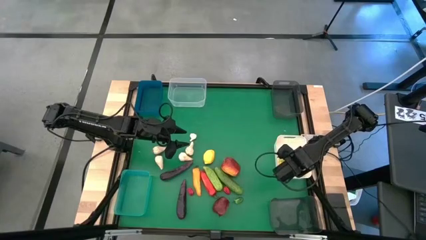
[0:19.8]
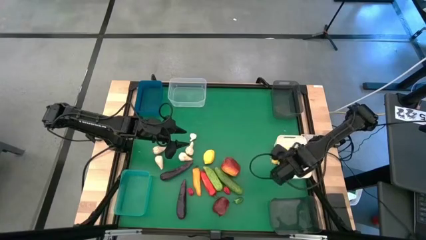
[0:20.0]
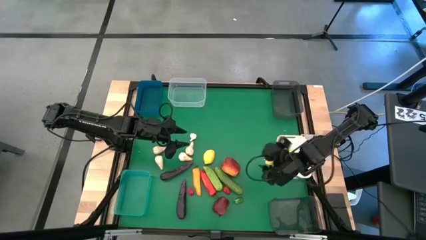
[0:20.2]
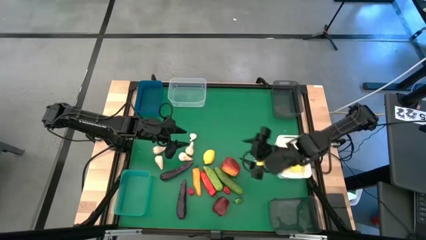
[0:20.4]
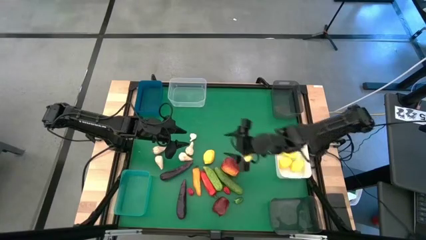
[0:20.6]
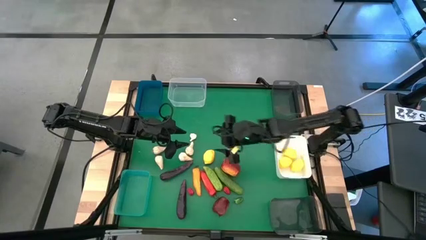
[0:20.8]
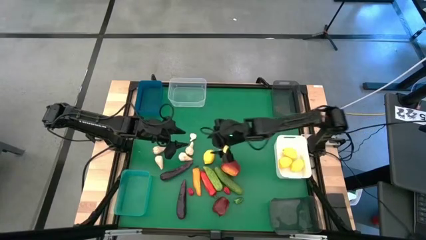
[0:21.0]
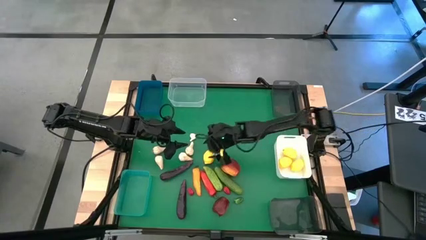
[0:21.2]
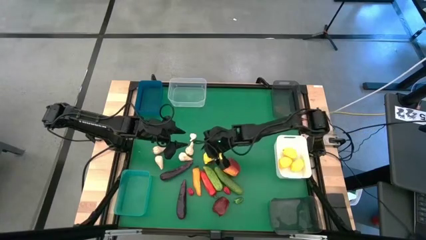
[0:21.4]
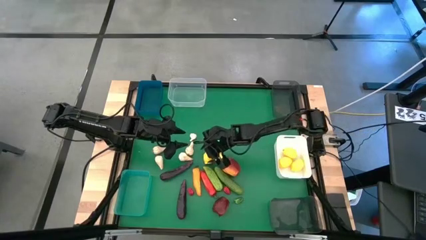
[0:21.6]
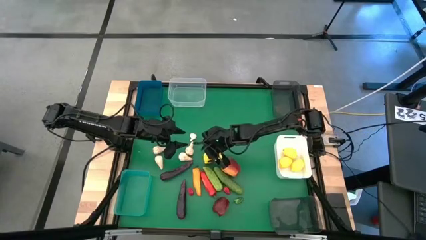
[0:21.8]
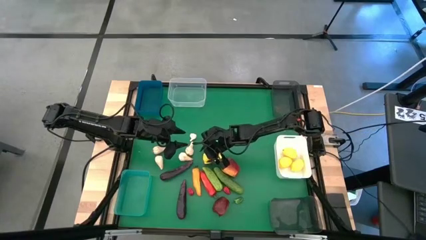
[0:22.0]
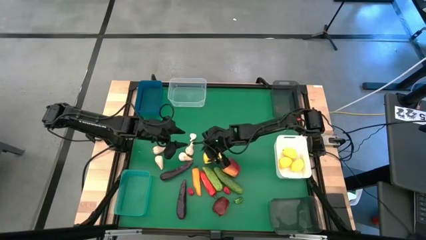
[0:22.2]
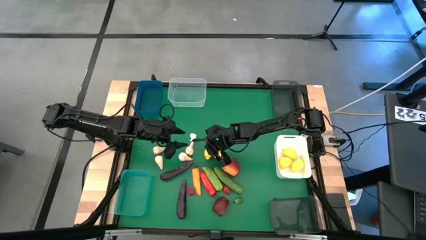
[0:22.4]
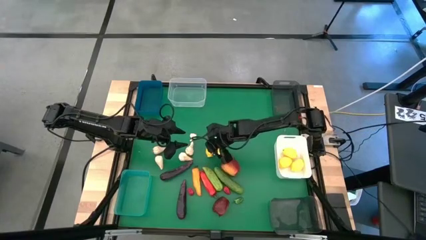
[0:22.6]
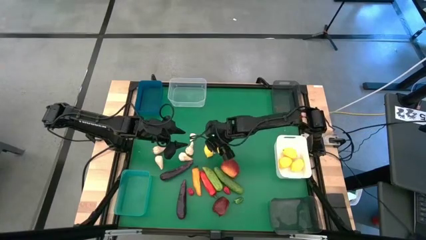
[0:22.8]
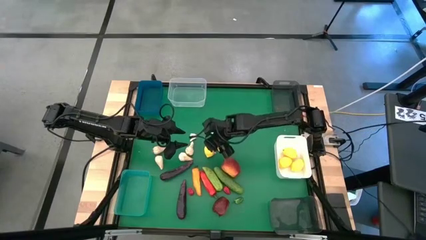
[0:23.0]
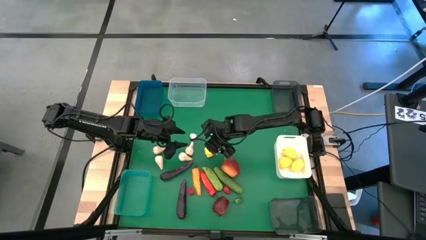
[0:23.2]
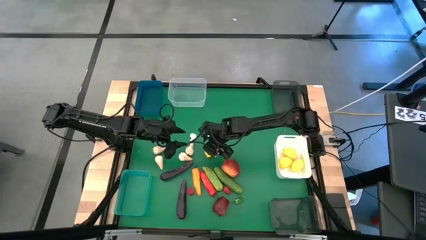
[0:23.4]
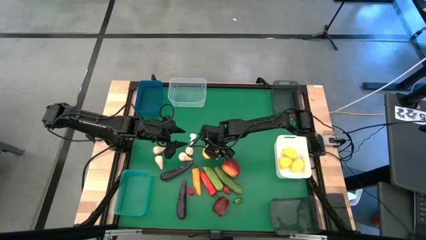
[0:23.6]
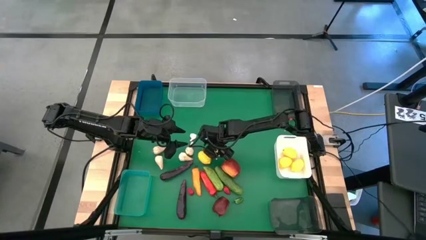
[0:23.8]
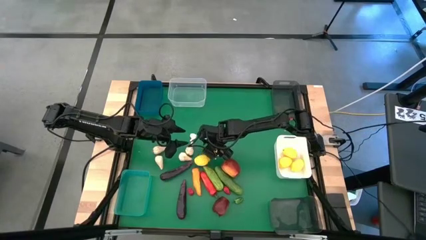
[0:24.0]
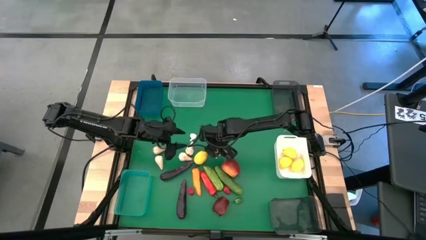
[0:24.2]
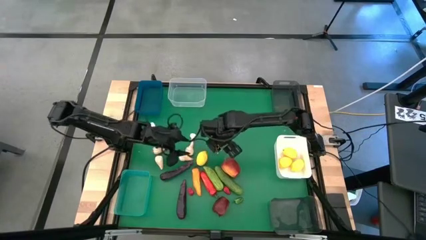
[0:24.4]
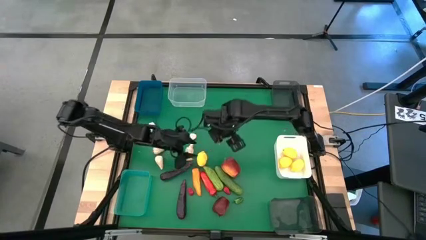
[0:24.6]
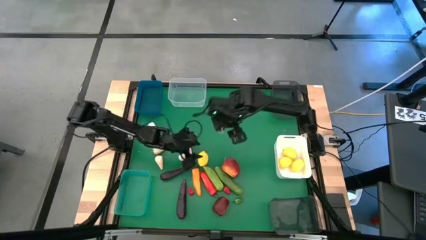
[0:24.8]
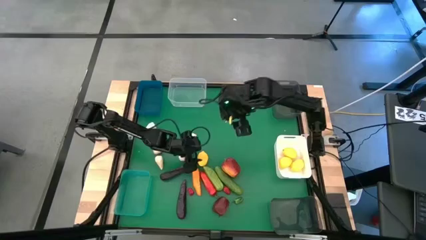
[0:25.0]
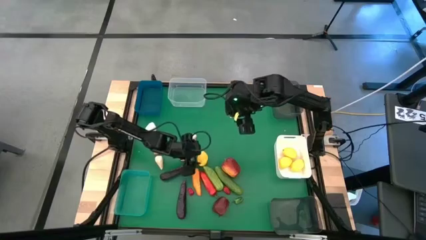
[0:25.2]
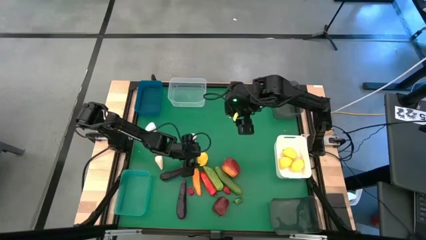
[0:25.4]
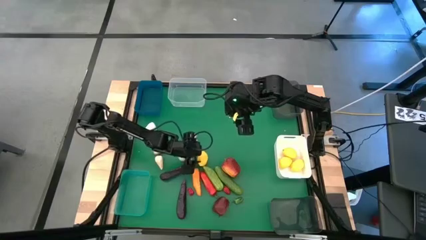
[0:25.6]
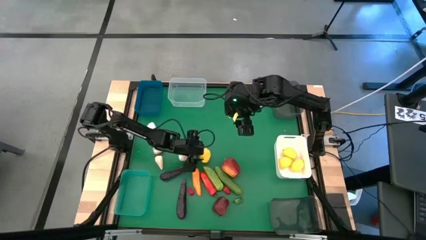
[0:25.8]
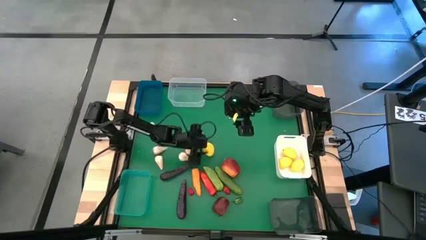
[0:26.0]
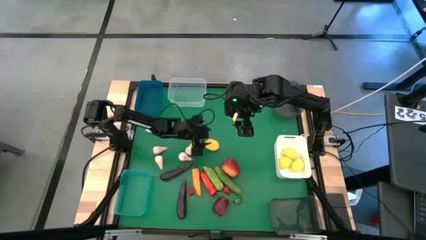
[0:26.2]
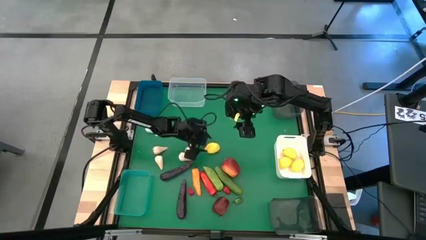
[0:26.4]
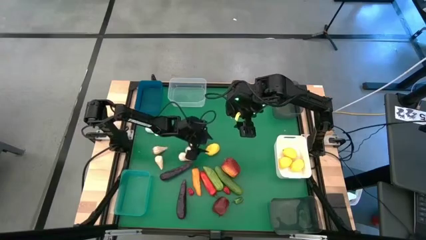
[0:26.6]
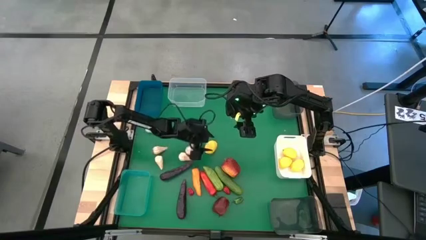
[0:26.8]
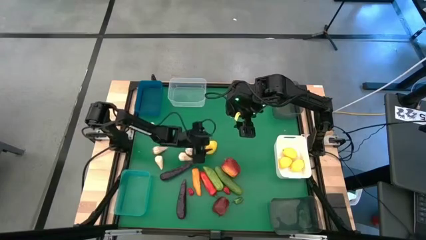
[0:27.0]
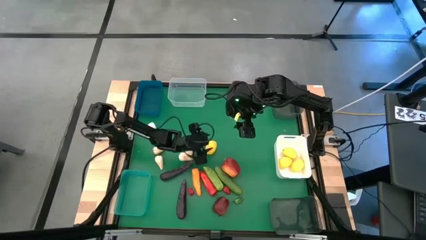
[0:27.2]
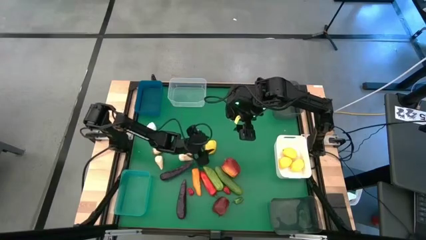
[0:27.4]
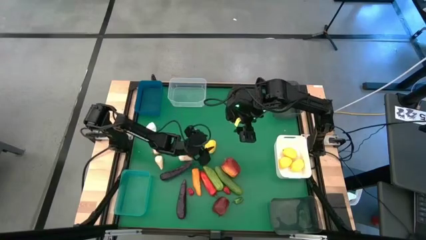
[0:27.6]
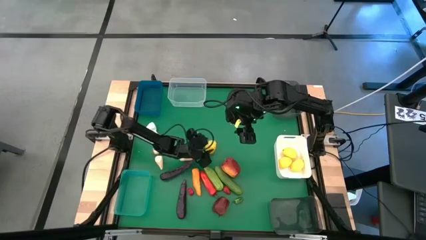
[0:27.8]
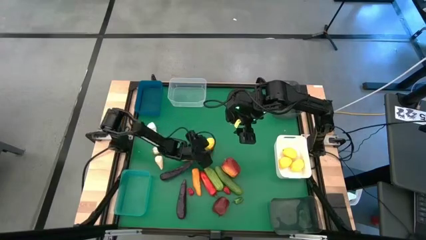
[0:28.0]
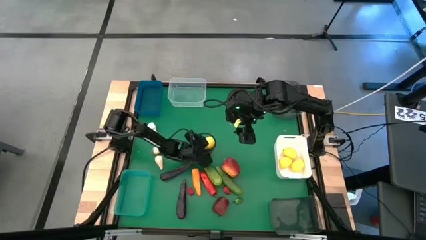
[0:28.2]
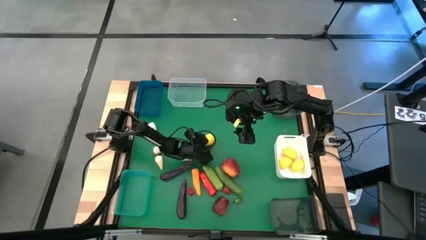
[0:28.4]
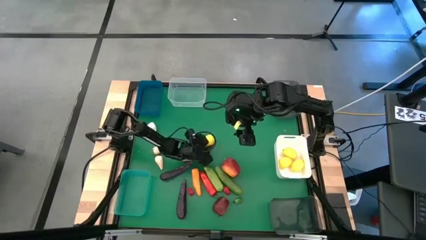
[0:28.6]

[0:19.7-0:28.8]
Task: Sort produce into baskets
Put the yellow lemon into the white bin

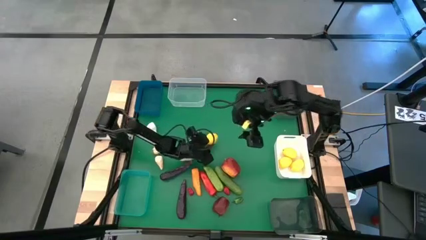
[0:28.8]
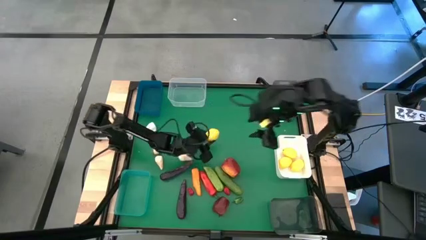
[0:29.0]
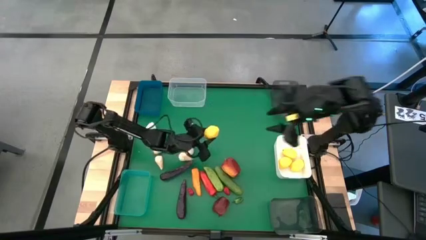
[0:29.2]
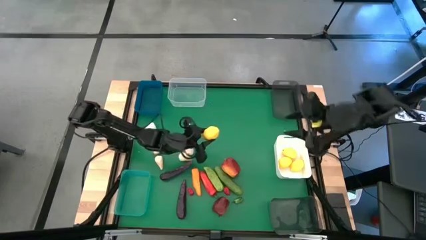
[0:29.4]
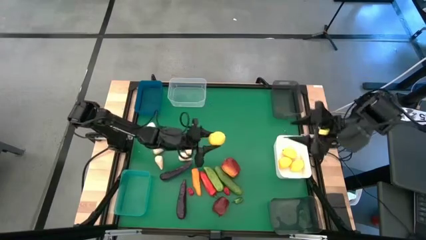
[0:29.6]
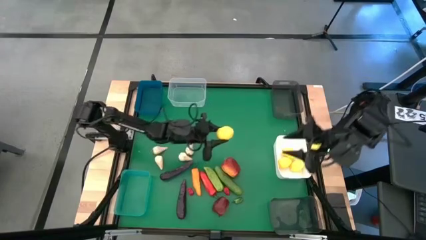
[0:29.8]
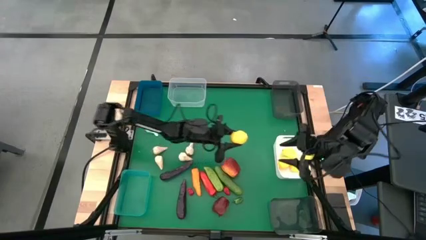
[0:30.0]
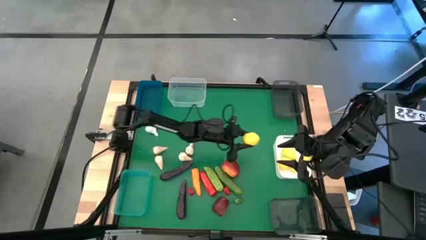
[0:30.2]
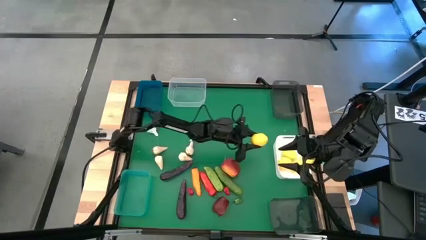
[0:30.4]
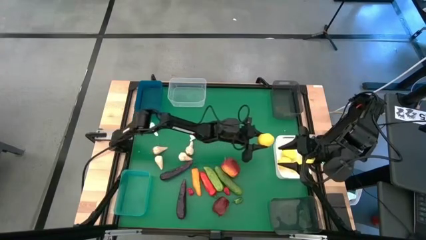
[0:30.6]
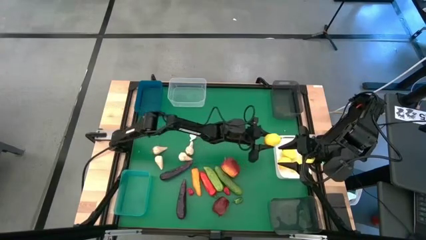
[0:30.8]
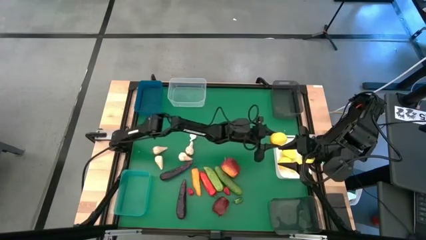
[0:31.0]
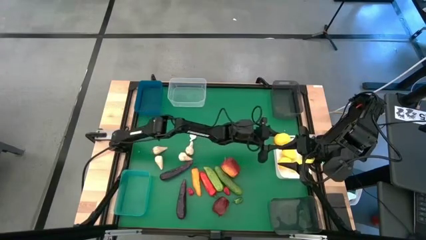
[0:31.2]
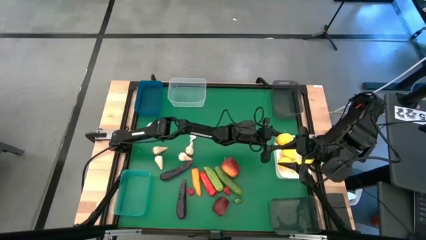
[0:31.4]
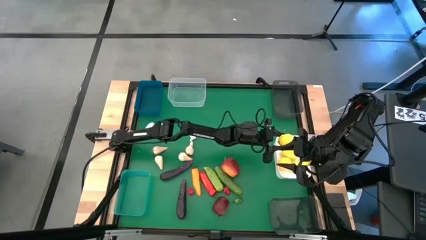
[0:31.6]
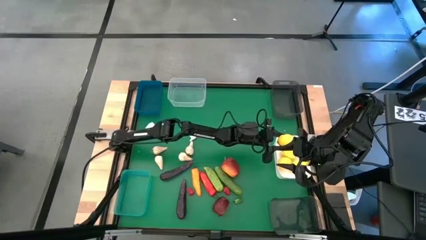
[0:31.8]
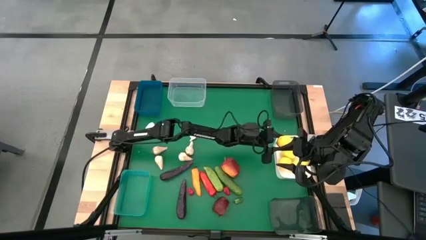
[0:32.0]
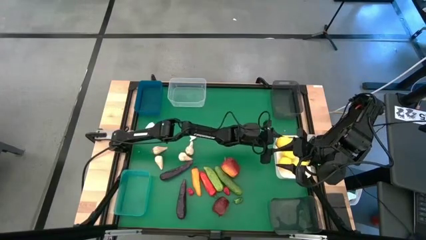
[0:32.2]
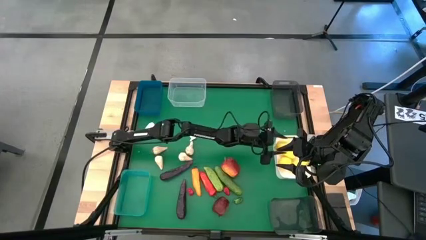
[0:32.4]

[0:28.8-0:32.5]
Put the yellow lemon into the white bin

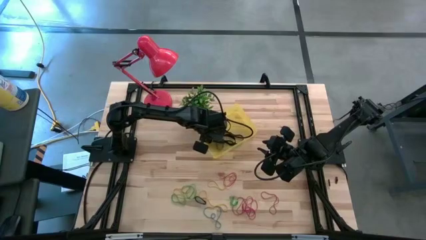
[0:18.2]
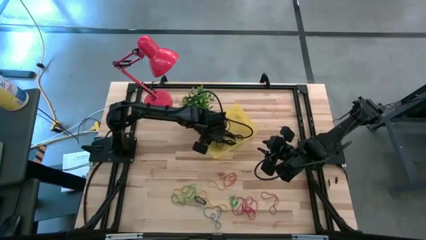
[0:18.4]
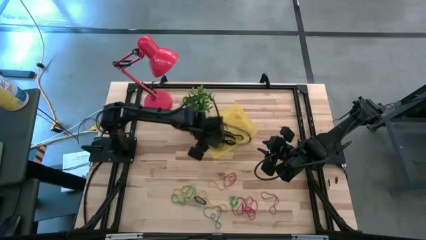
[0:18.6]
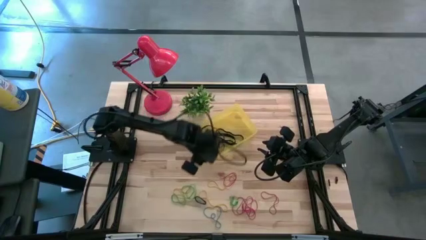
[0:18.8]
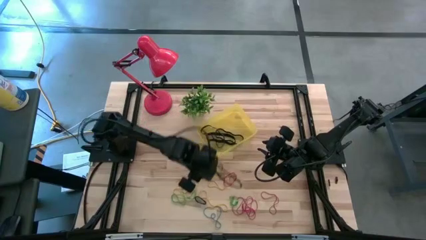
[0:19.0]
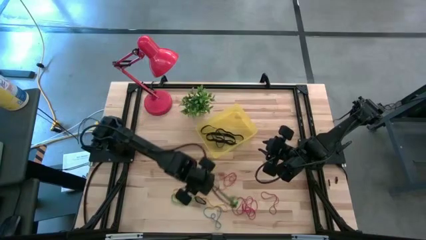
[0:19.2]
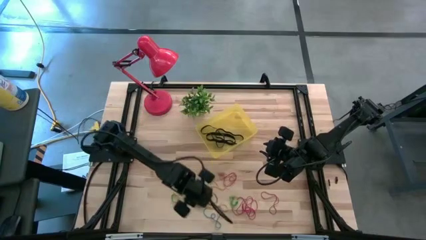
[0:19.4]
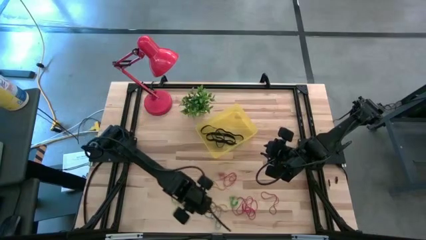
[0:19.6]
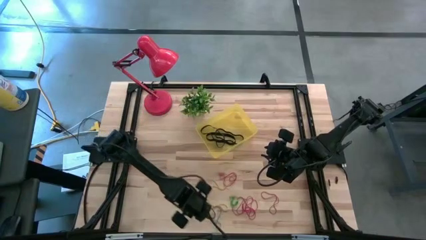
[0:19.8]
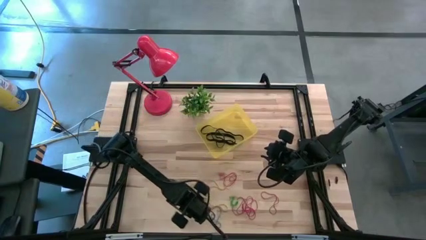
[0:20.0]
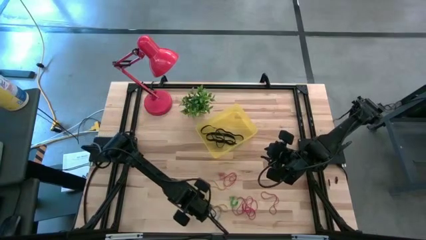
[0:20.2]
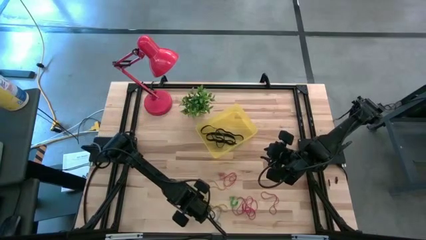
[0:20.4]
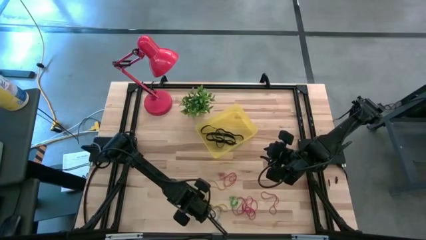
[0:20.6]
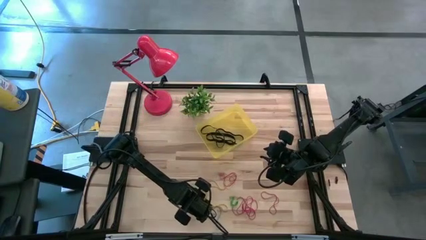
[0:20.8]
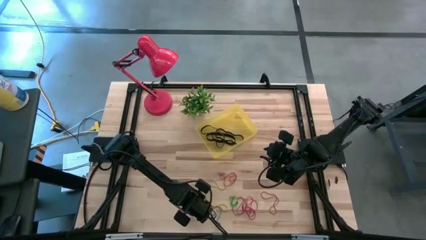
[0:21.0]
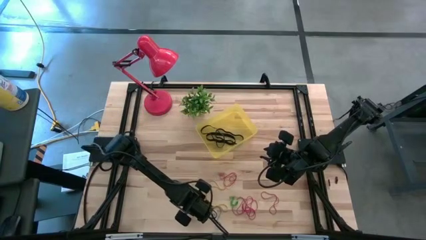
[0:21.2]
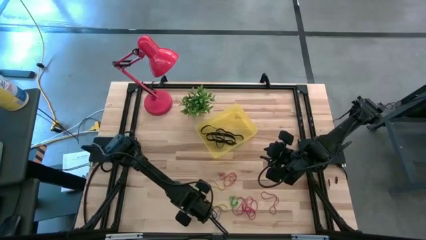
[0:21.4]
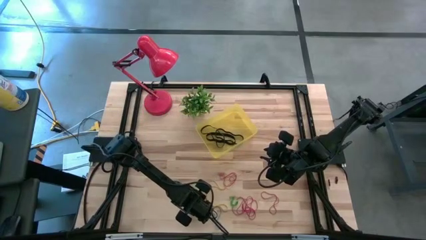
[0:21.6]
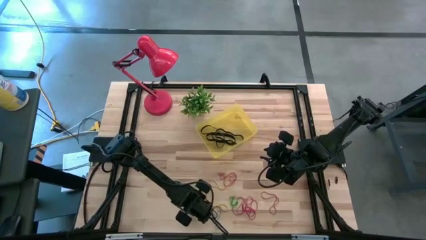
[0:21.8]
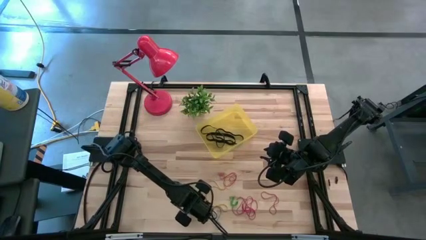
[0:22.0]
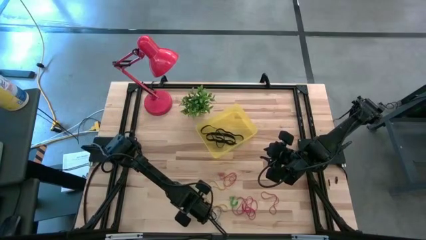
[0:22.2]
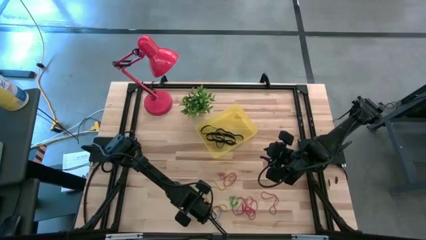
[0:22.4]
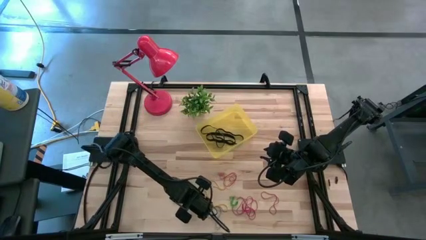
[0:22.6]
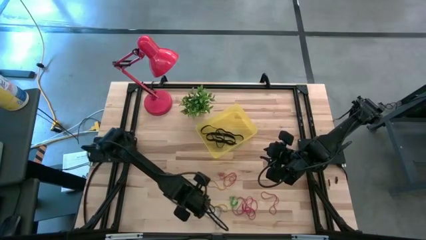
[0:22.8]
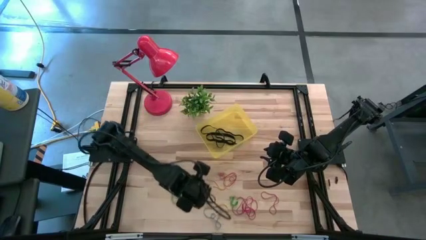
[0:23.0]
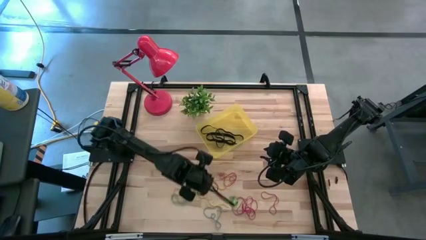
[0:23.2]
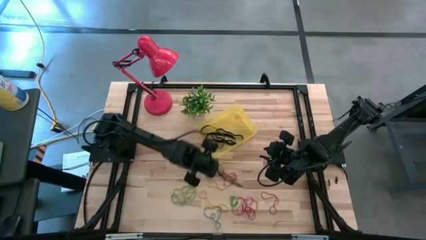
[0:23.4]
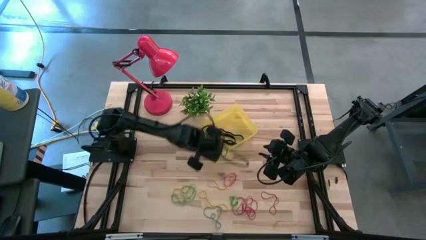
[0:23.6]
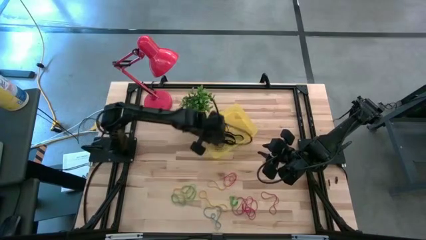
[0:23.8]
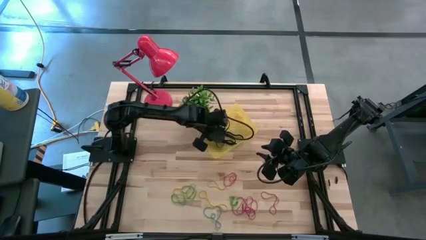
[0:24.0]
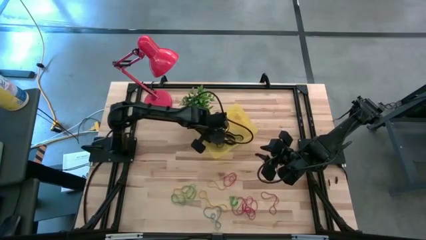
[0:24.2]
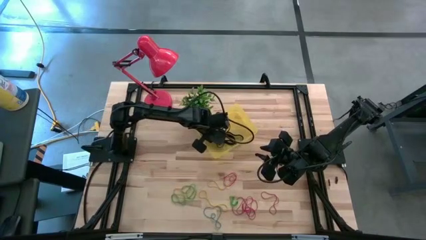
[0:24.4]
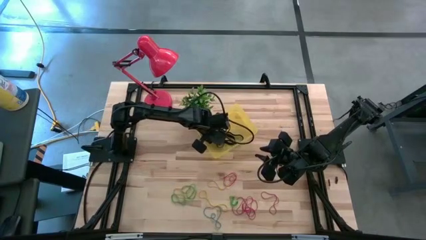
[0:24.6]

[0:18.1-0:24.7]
Task: Pick and place rubber bands into bin
Put the black rubber band into the transparent yellow bin
